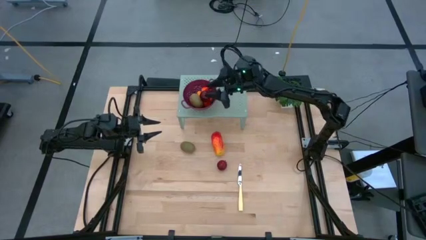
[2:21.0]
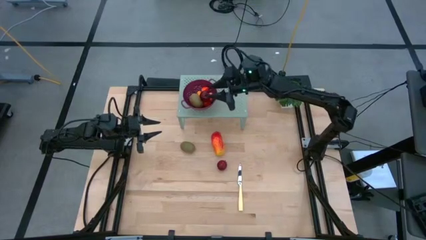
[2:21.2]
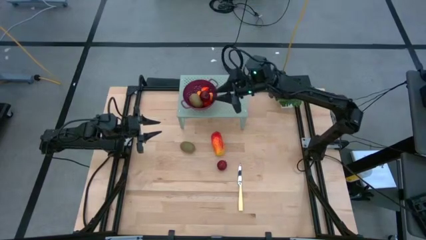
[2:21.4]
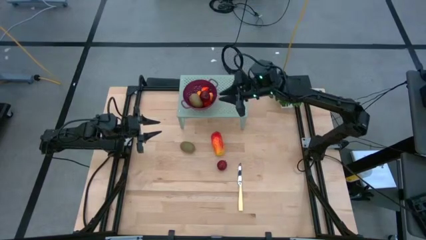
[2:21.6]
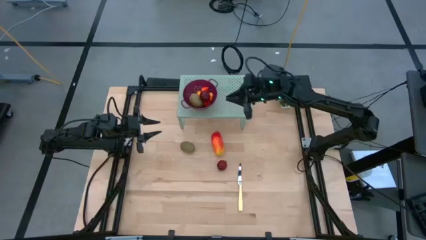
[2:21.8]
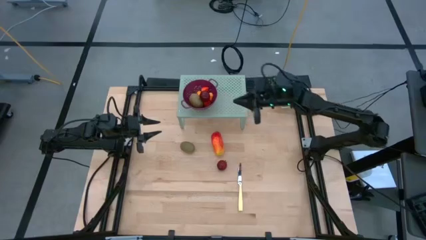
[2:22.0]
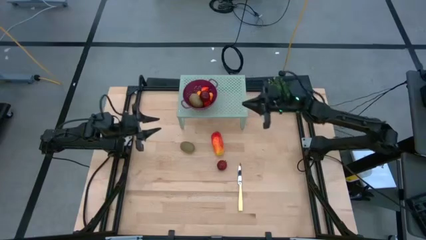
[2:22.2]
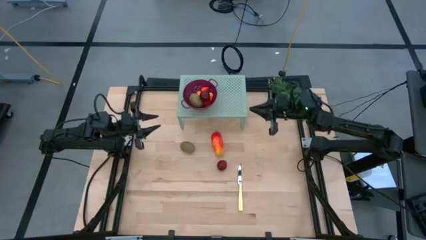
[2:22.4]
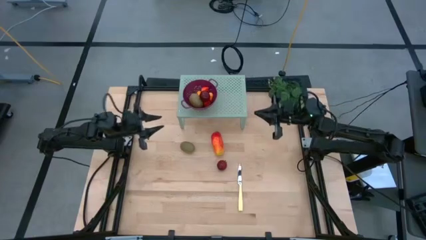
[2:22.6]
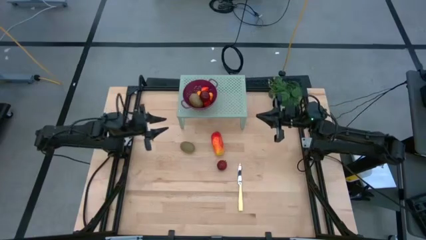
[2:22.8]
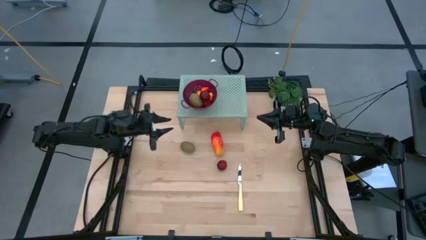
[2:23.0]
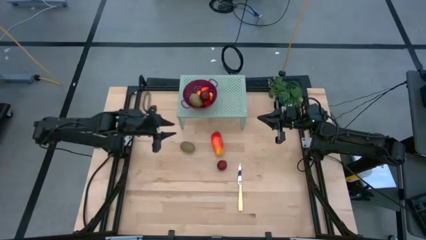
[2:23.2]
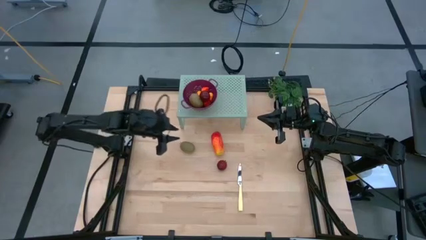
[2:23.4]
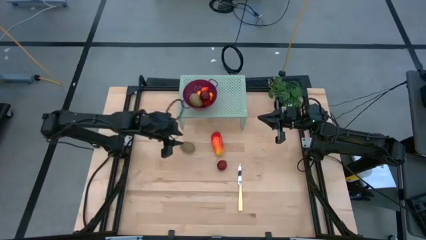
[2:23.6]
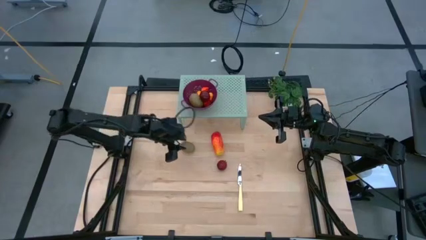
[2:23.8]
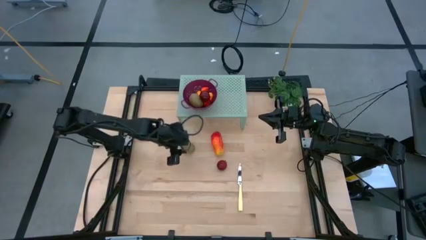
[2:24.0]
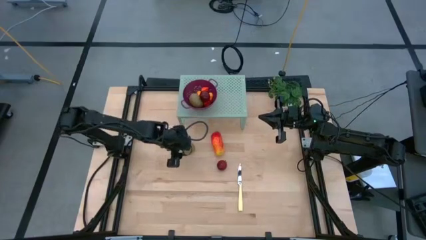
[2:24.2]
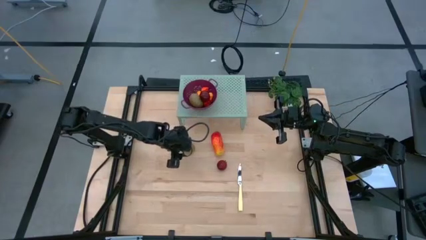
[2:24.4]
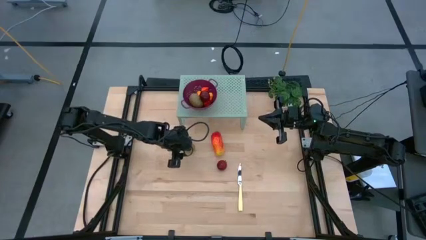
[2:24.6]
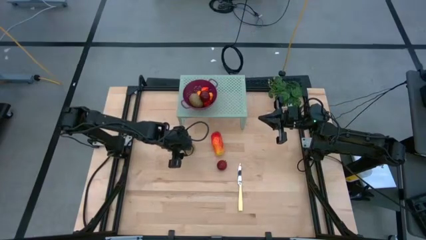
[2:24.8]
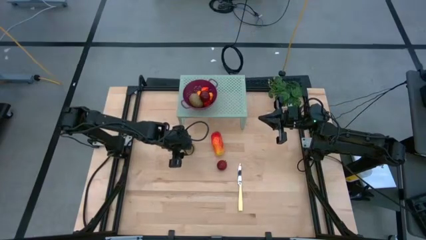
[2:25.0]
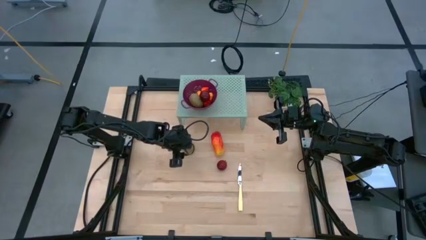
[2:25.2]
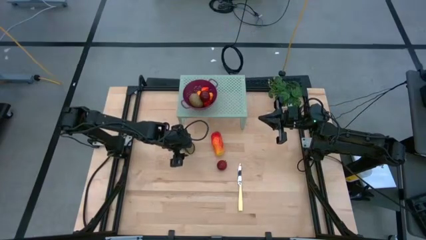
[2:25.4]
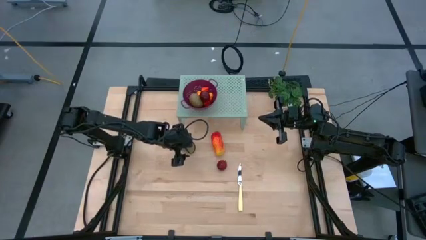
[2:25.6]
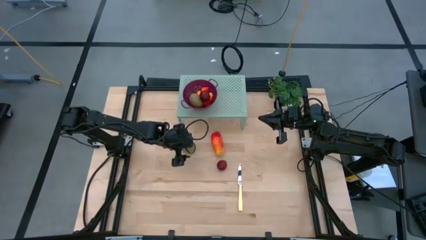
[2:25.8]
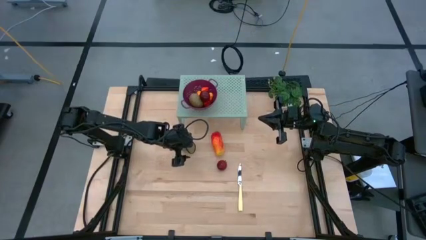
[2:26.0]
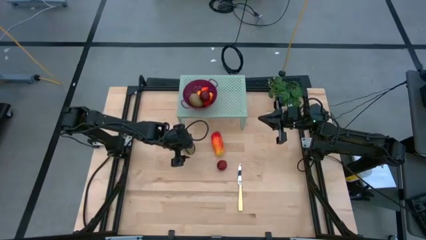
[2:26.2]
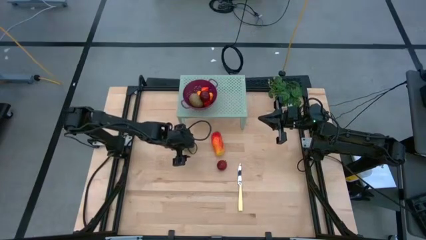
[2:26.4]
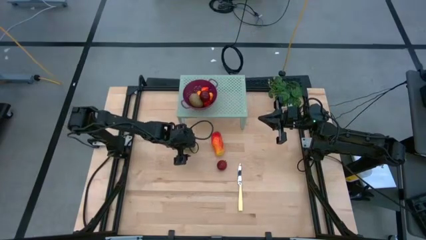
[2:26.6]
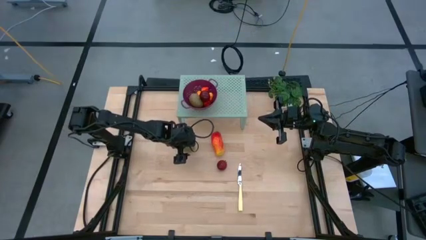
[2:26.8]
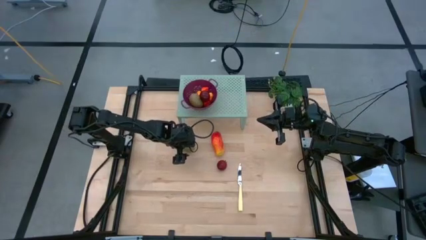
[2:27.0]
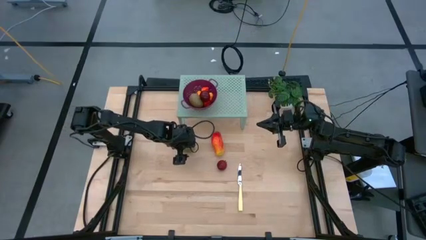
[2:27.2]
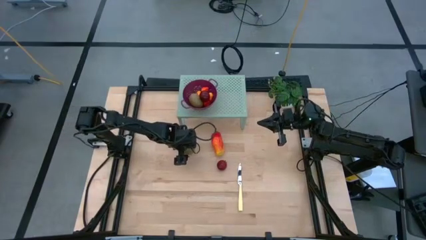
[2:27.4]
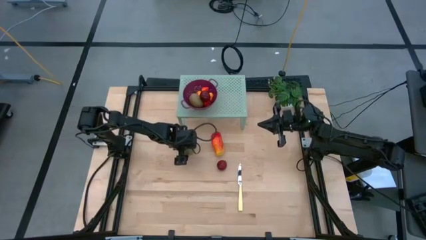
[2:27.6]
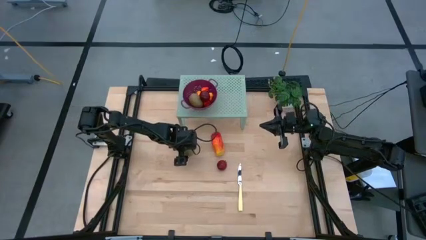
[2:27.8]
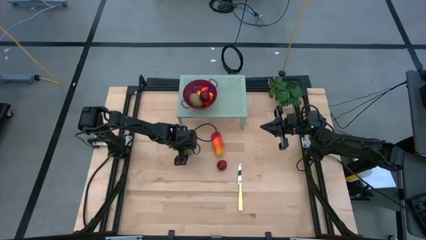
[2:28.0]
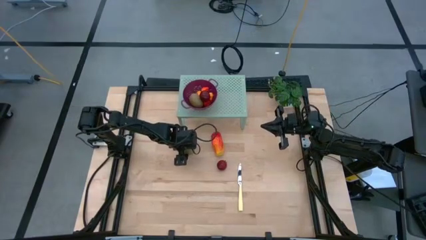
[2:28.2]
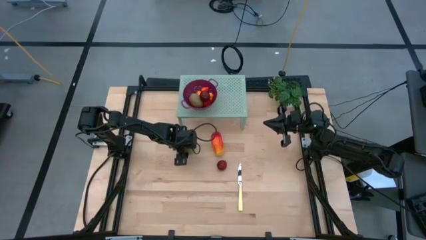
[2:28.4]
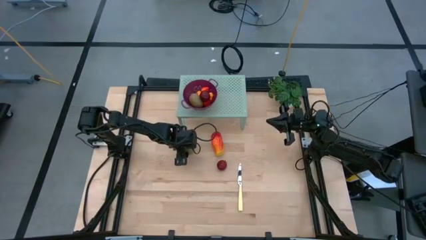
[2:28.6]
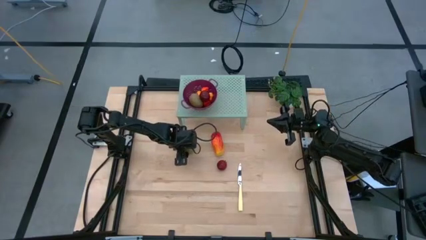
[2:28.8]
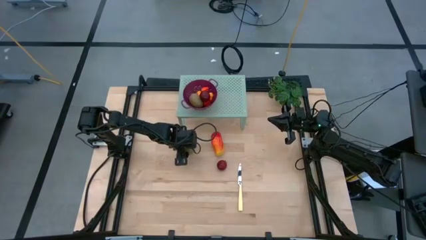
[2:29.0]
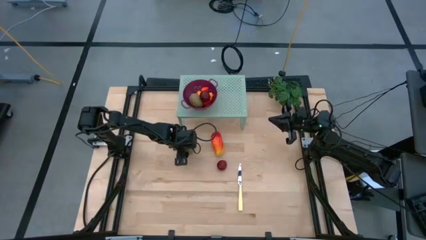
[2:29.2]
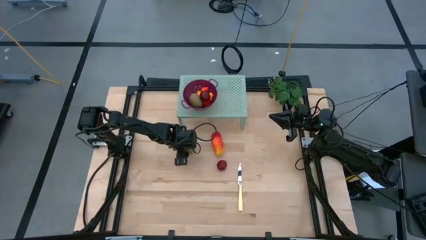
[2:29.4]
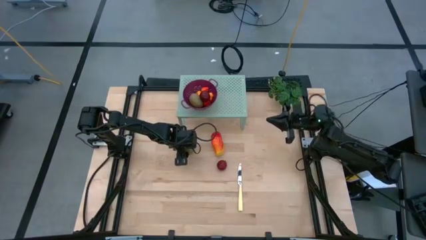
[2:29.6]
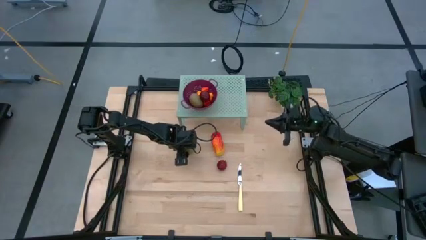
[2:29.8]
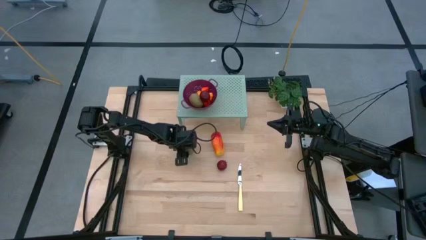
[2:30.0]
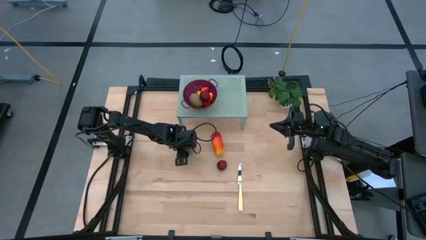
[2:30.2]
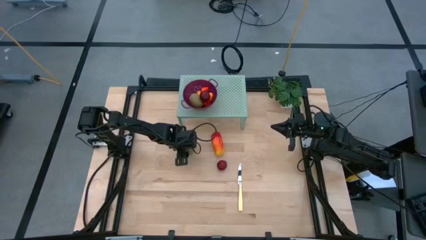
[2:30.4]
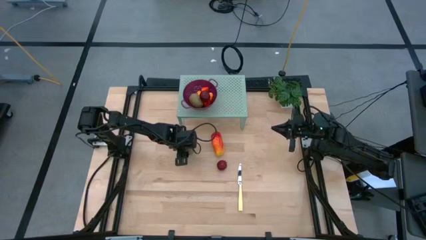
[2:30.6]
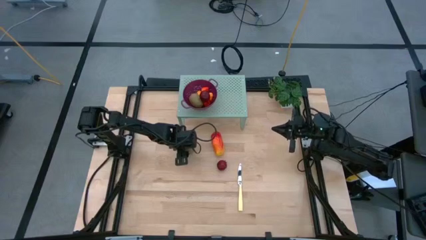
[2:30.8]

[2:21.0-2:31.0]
Task: Pick & Place Fruit
Put the kiwi into violet strainer bowl on the shelf
